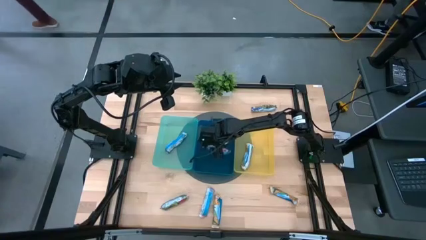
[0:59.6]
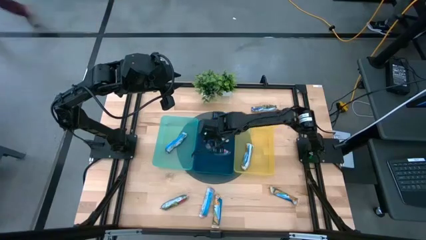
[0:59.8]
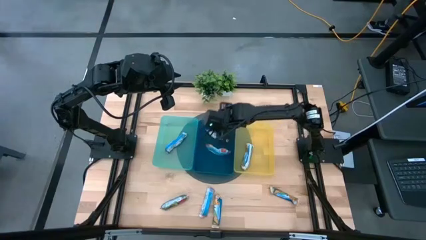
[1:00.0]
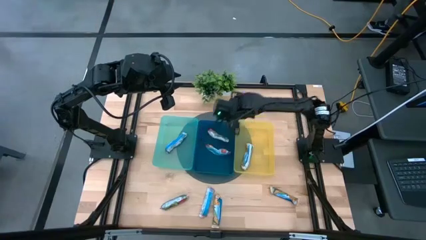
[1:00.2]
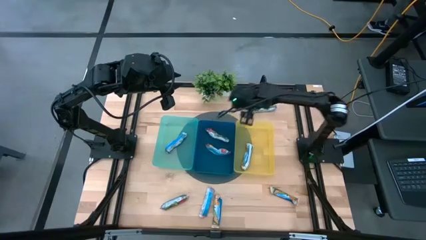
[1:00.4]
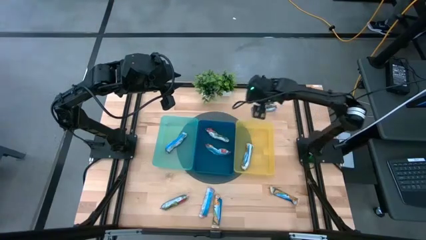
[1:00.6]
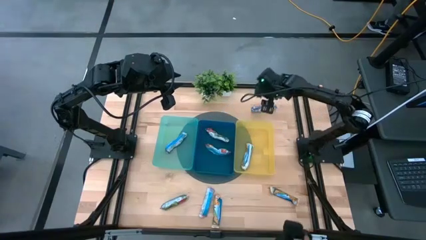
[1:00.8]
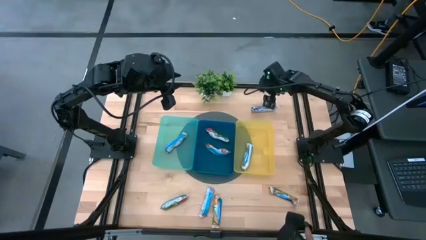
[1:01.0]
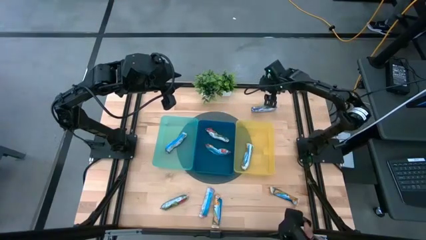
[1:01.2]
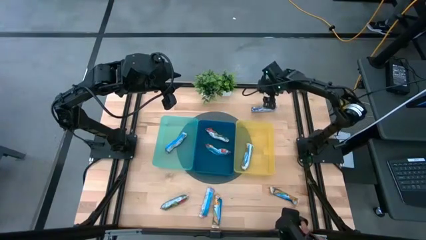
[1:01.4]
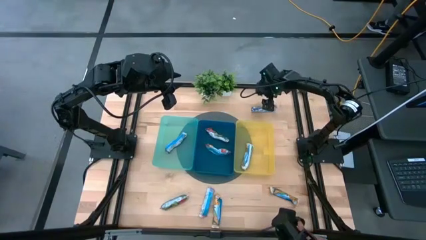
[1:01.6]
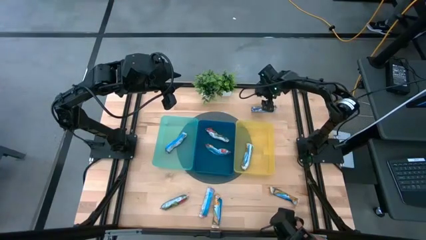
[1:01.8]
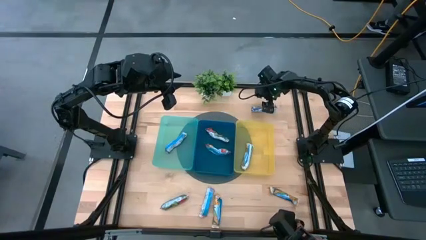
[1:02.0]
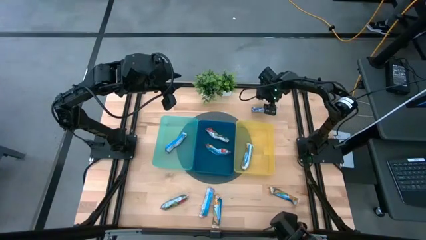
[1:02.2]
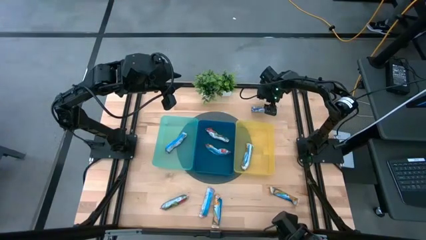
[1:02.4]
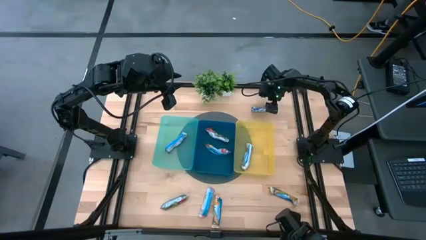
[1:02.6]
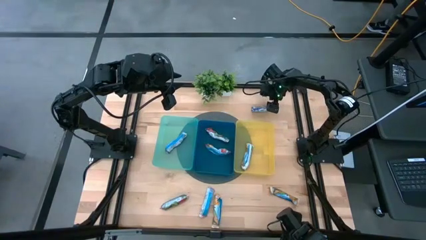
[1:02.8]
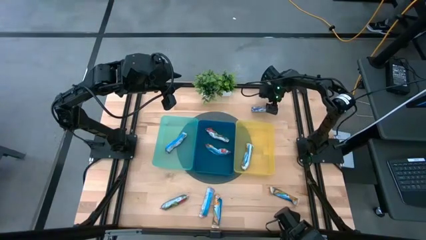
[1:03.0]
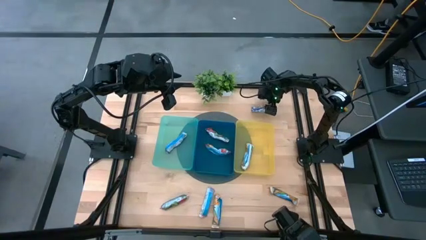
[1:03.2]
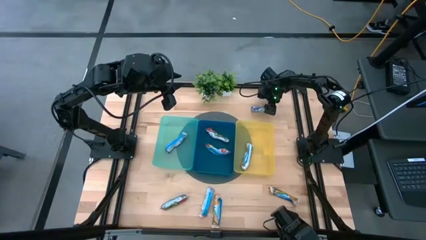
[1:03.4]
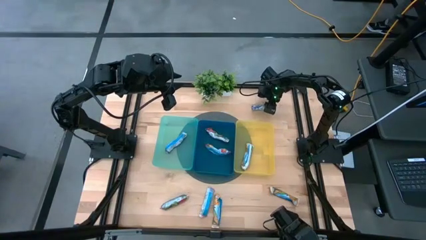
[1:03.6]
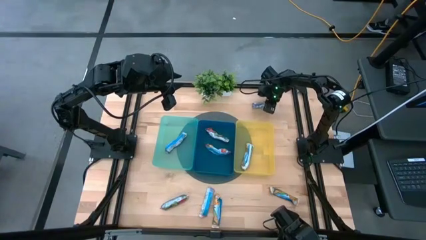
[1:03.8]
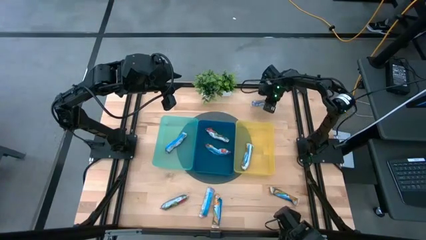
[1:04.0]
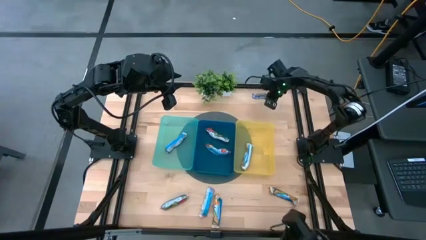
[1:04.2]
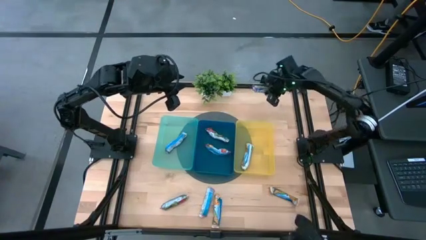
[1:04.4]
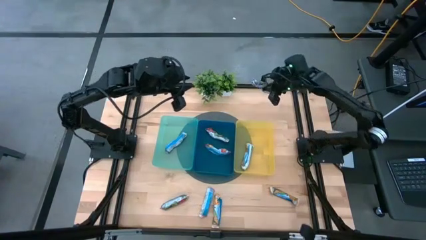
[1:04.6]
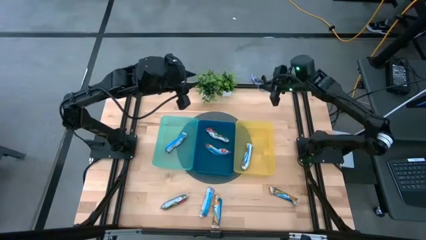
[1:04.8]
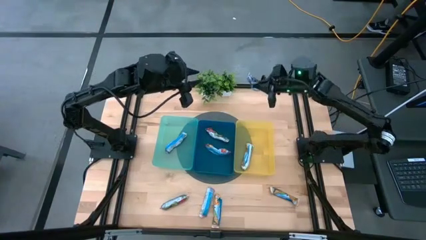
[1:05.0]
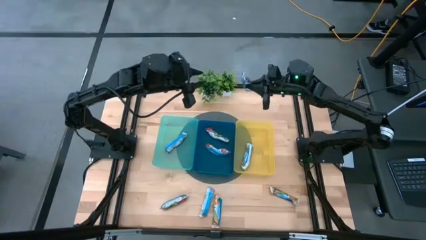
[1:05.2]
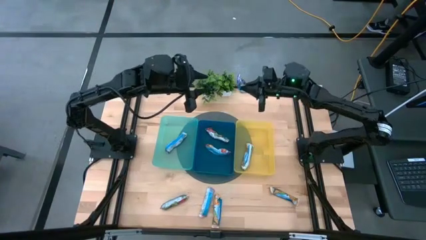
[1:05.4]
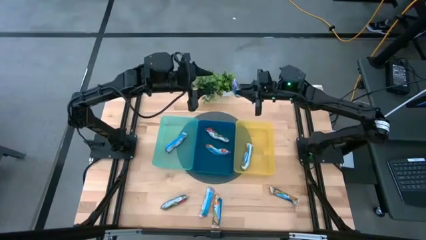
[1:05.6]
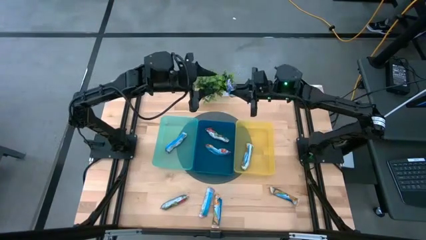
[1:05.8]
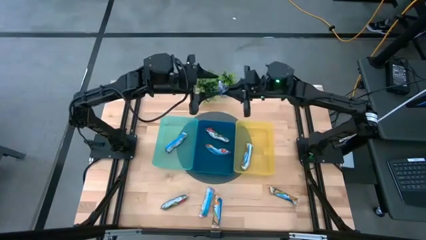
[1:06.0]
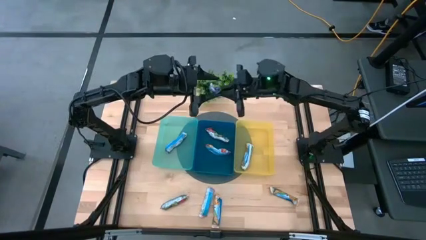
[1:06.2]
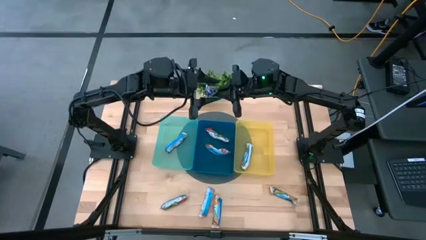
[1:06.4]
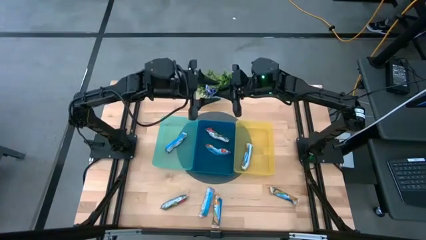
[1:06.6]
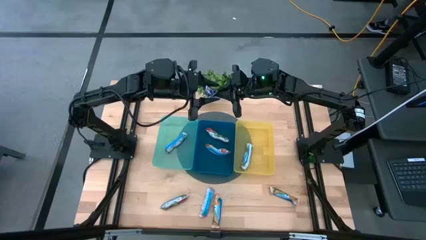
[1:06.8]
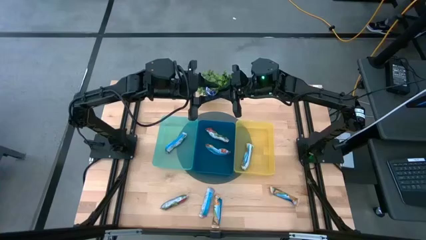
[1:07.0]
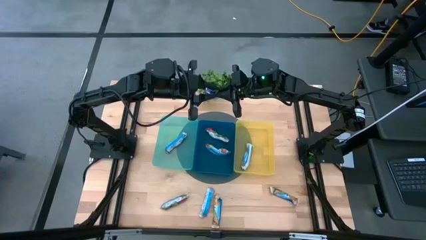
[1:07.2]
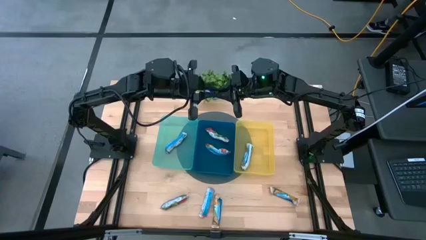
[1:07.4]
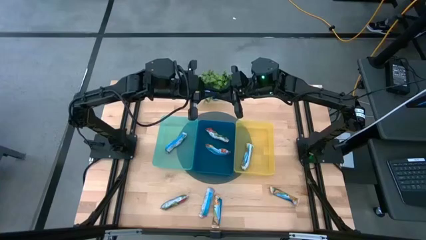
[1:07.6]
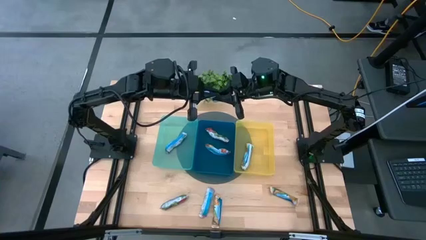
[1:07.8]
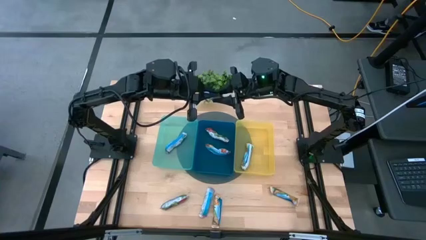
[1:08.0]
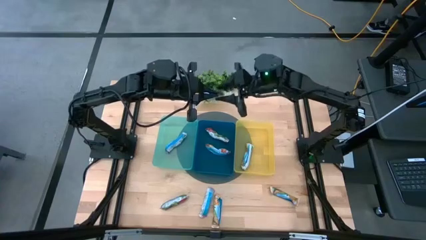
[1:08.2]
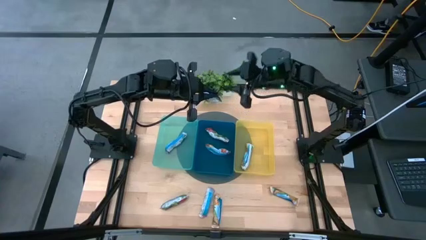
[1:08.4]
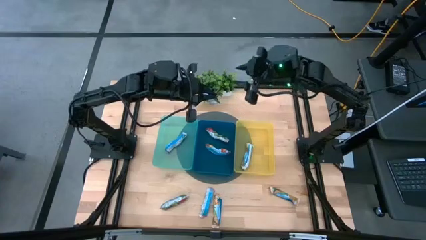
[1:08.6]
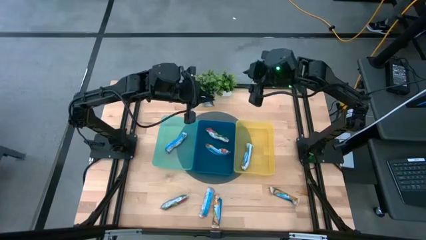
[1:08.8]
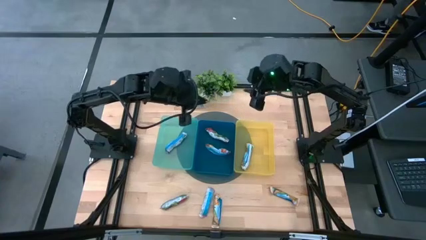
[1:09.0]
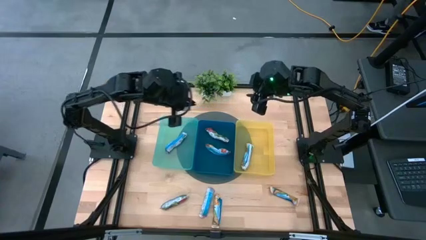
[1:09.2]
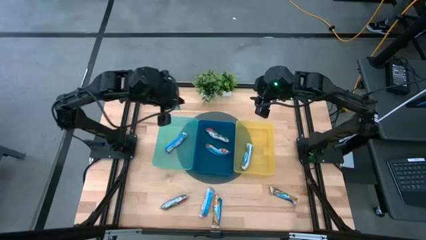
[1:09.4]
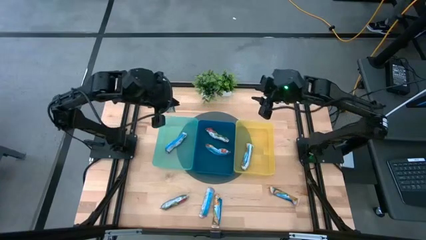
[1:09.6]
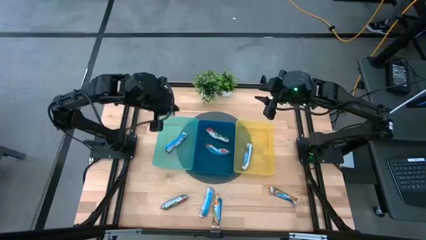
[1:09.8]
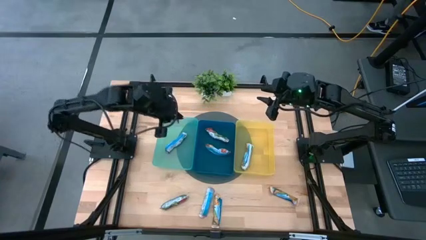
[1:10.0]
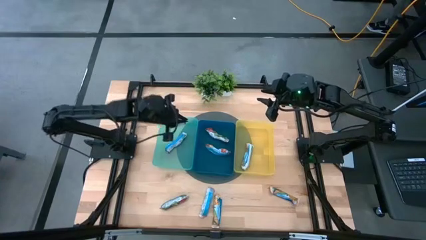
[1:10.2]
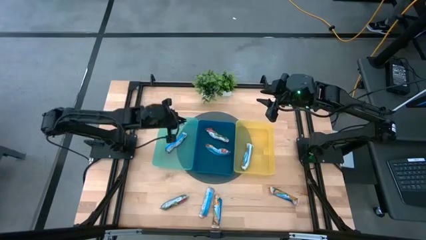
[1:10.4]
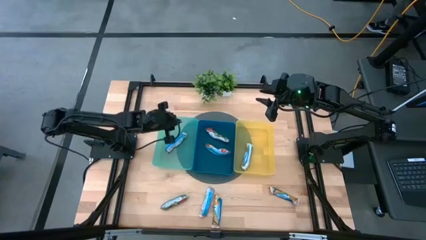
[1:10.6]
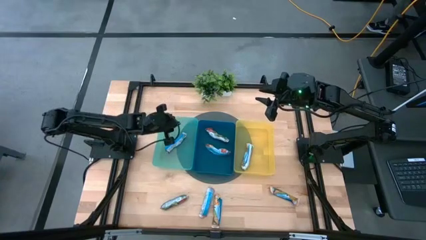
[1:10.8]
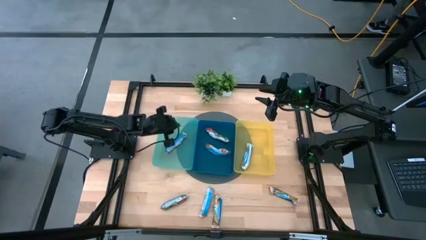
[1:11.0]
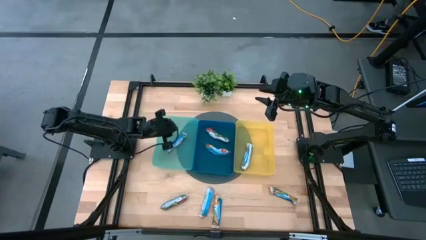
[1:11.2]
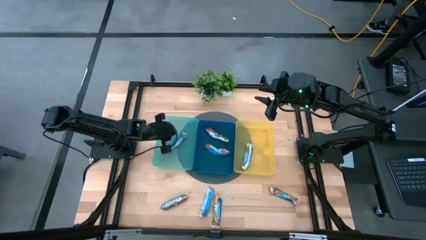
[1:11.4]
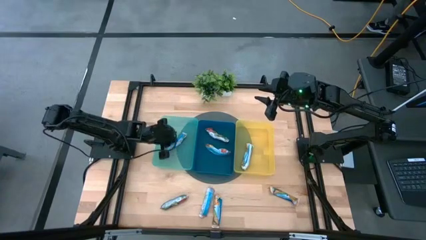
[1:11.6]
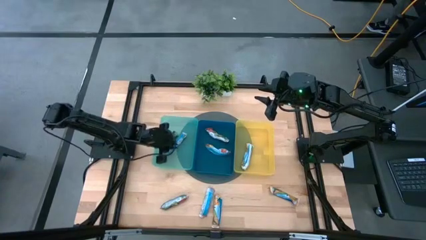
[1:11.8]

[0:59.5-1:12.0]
Task: Pick and place Granola Bars by type
Put the blue granola bar into the green bin
